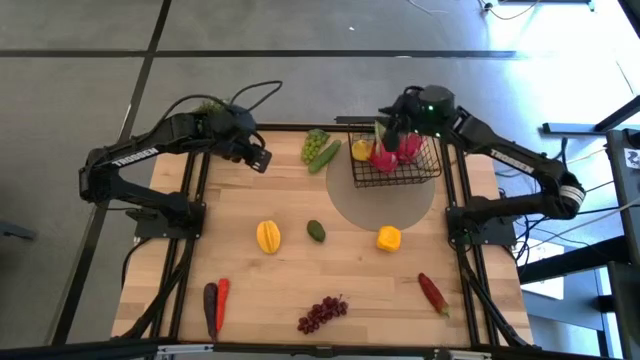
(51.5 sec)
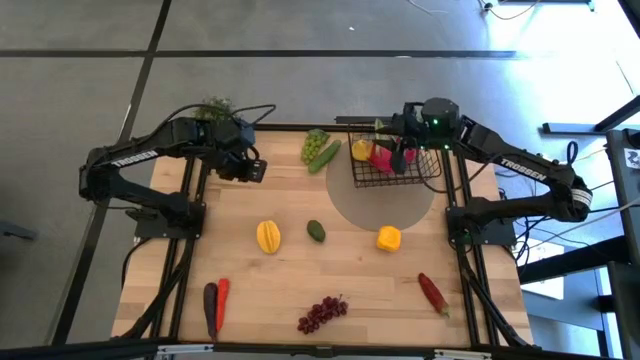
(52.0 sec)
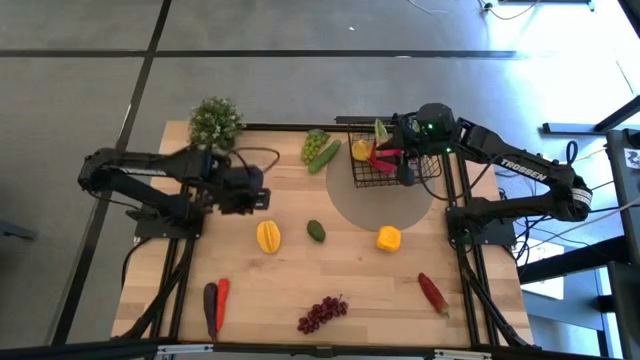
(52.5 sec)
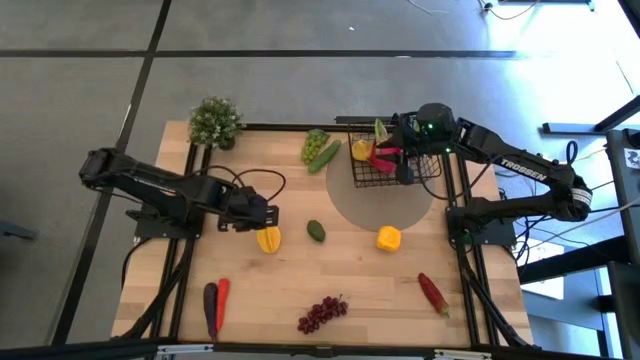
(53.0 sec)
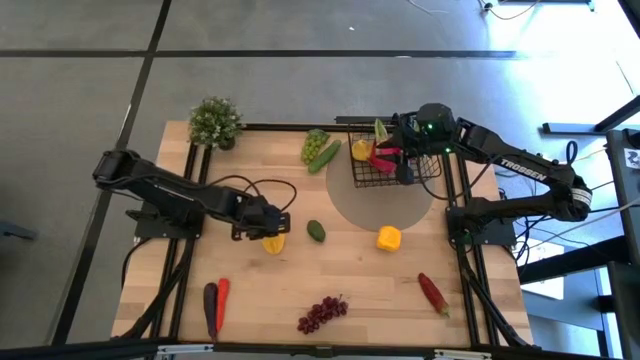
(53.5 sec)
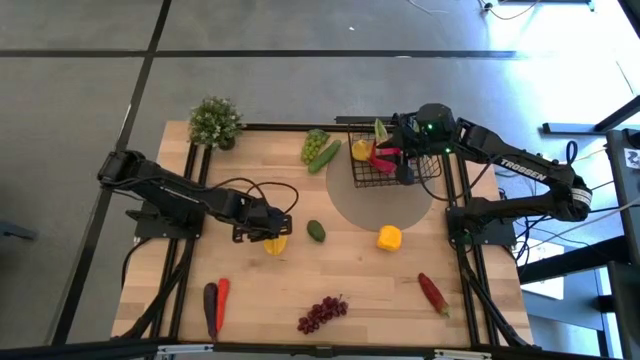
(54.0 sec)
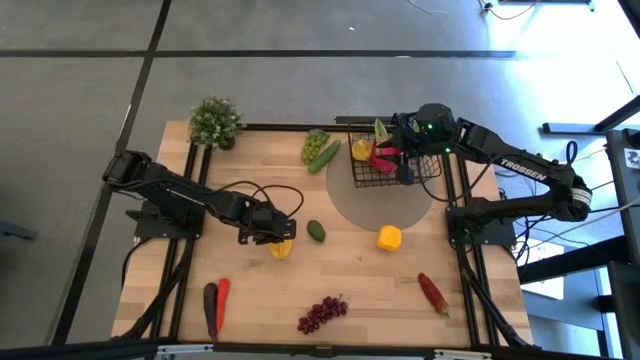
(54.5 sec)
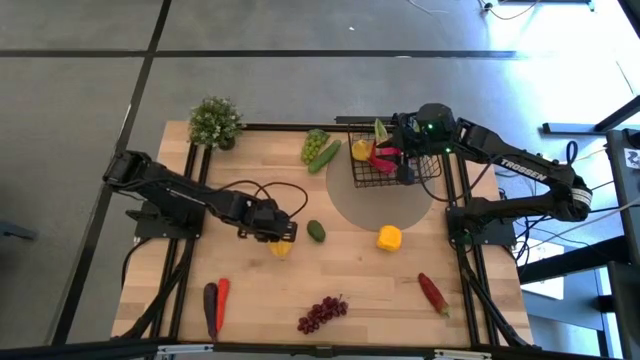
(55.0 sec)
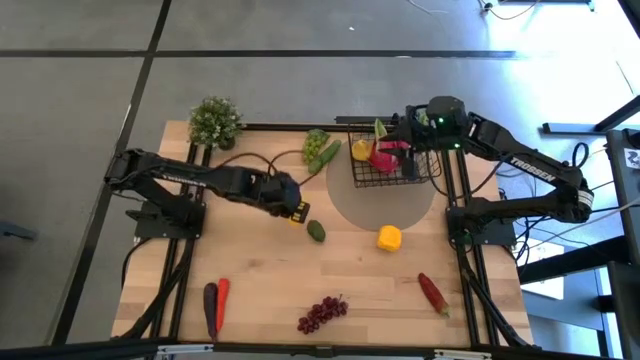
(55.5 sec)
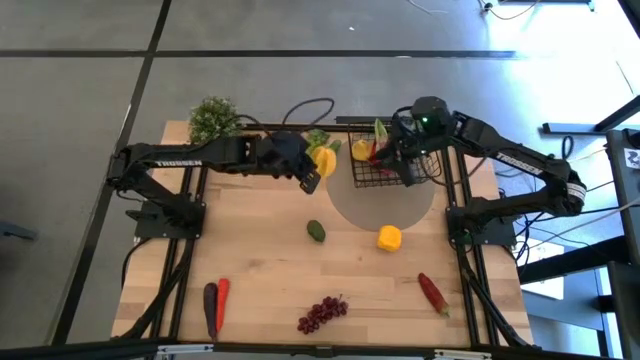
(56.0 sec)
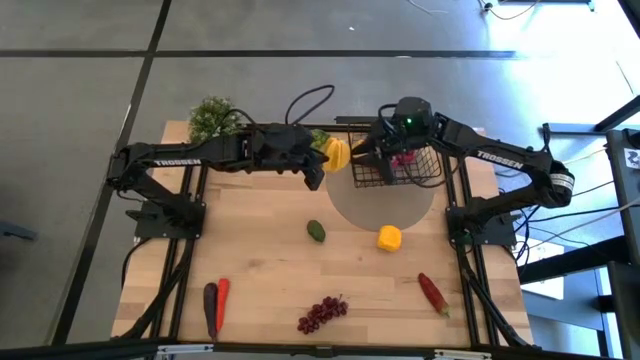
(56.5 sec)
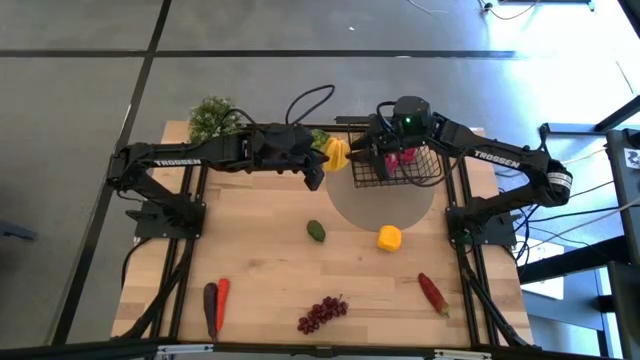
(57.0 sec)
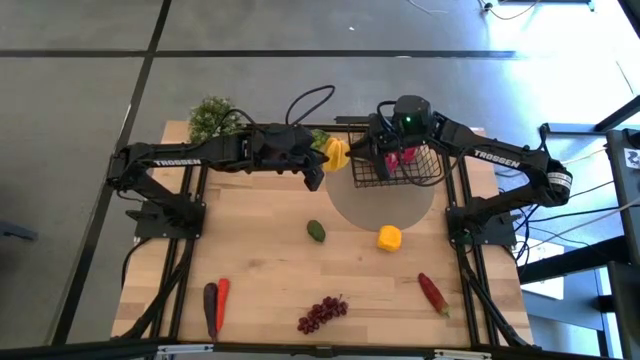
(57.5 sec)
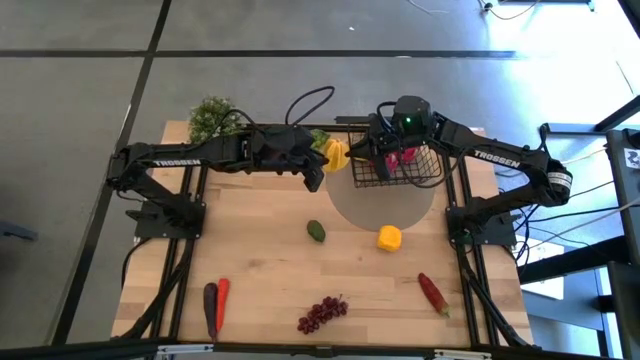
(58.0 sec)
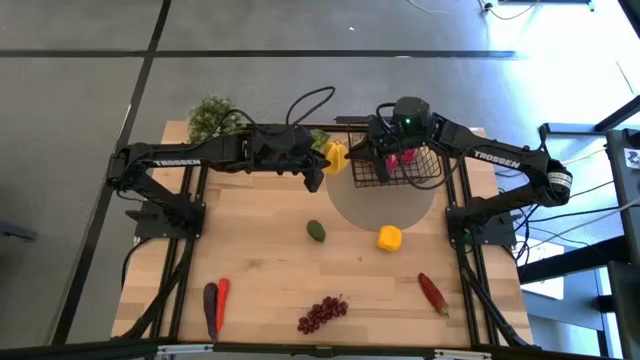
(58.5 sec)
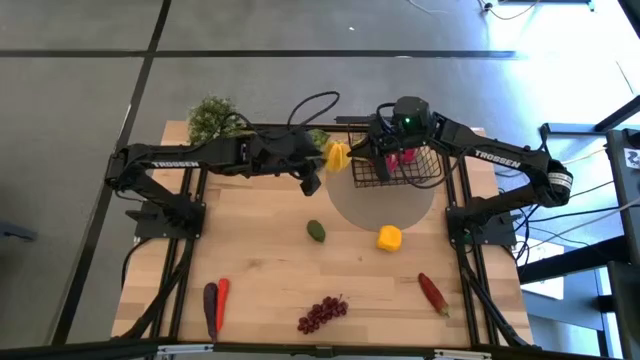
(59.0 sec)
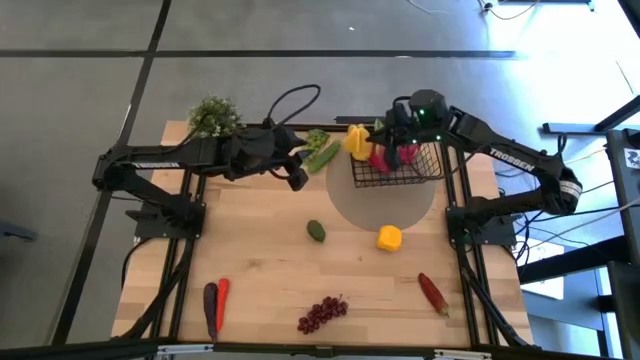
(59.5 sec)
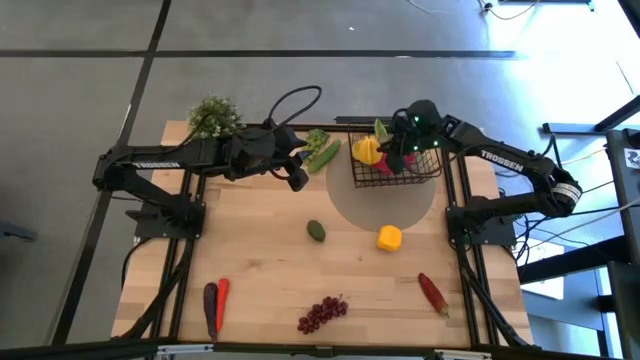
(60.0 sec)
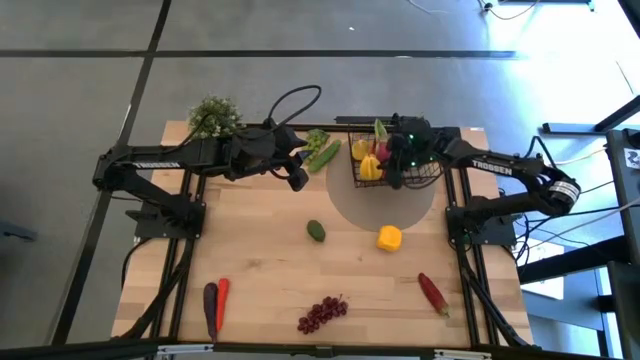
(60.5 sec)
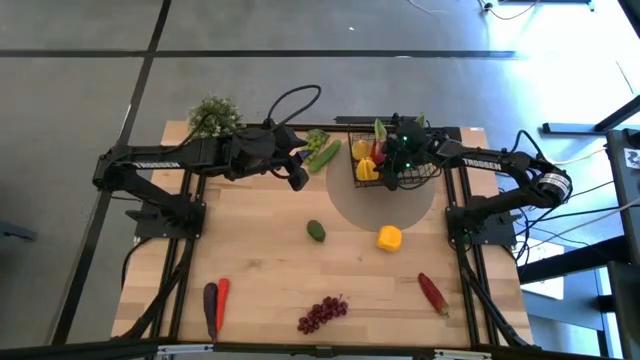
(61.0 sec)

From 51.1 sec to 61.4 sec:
Task: Build produce basket
Put the starfruit into the wire basket

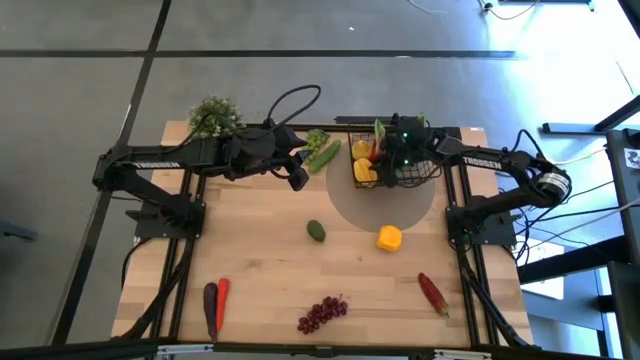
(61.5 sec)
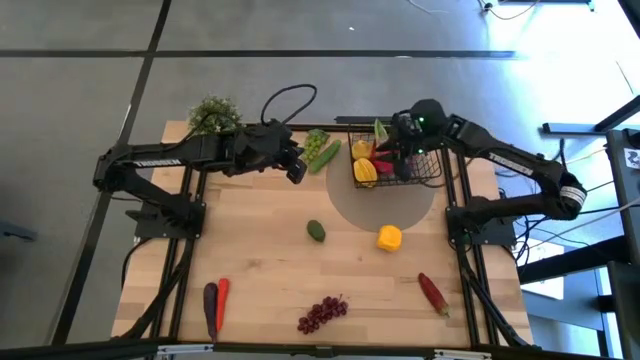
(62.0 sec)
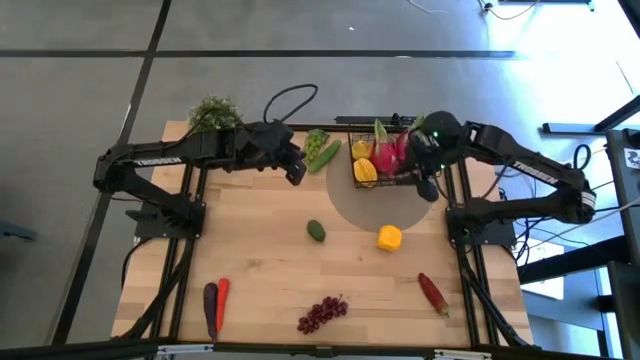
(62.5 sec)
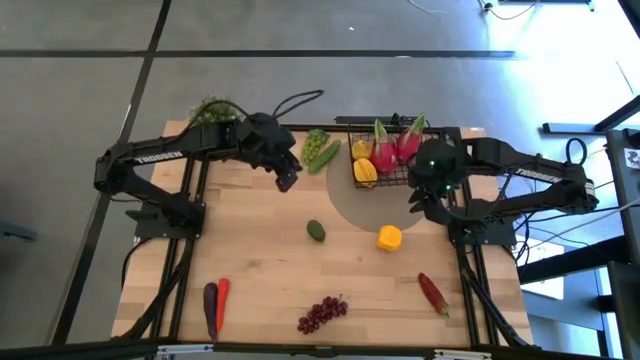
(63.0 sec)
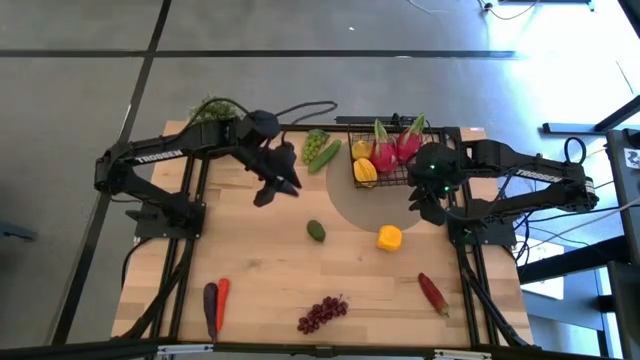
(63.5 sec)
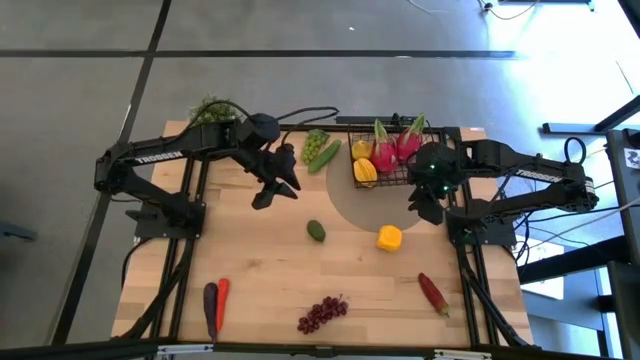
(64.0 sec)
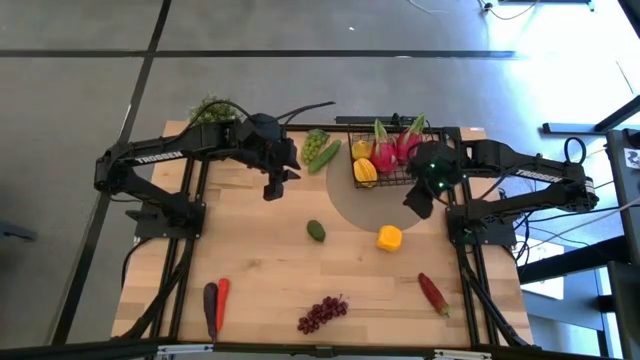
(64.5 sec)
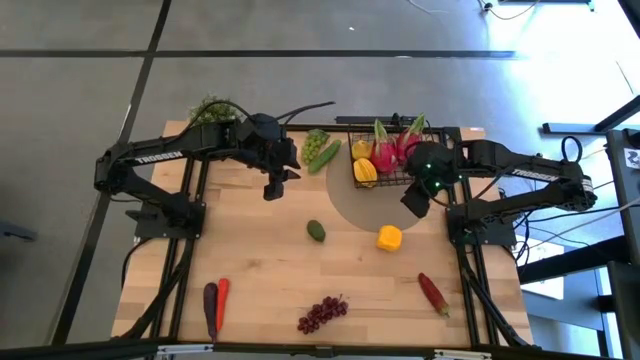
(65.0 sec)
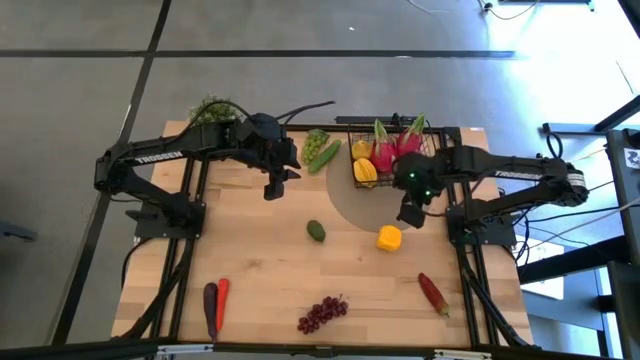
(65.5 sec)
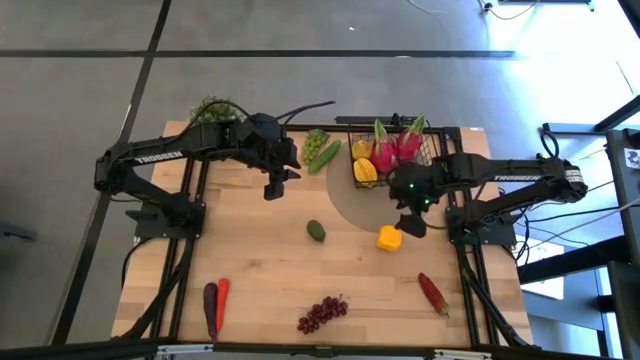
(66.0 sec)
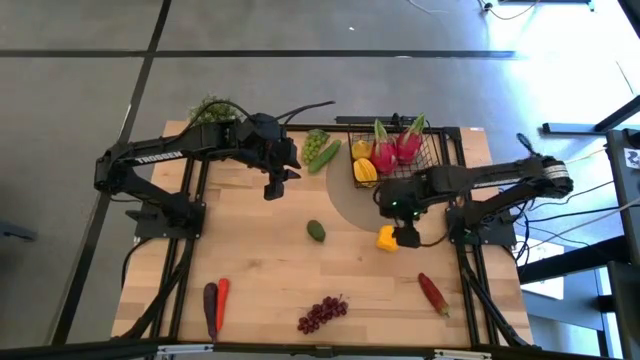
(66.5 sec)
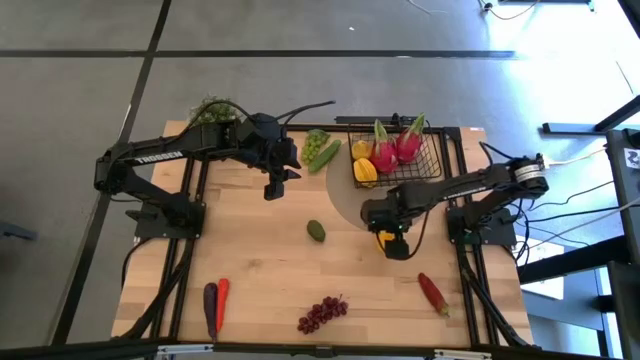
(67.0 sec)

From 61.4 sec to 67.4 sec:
Put the yellow bell pepper into the wire basket

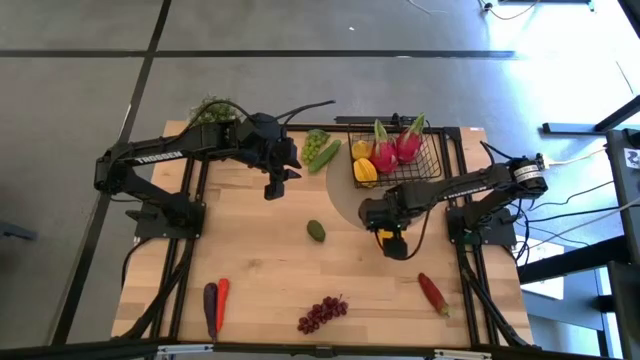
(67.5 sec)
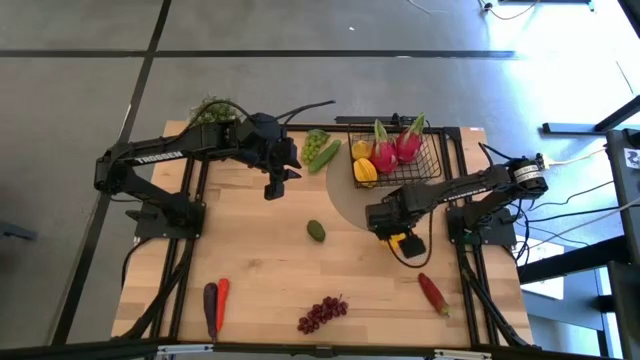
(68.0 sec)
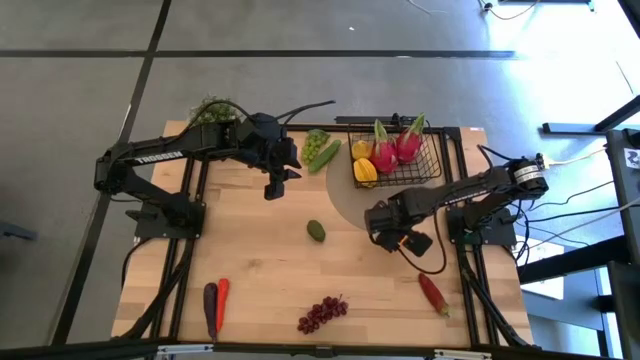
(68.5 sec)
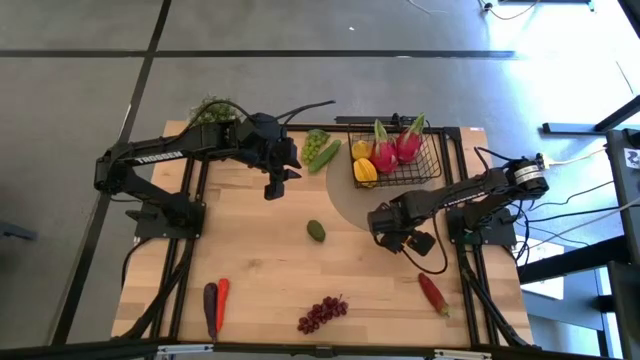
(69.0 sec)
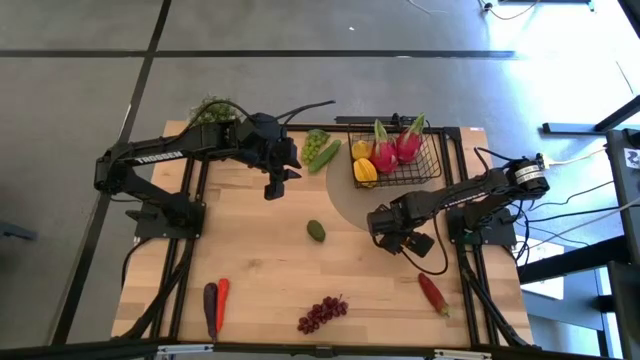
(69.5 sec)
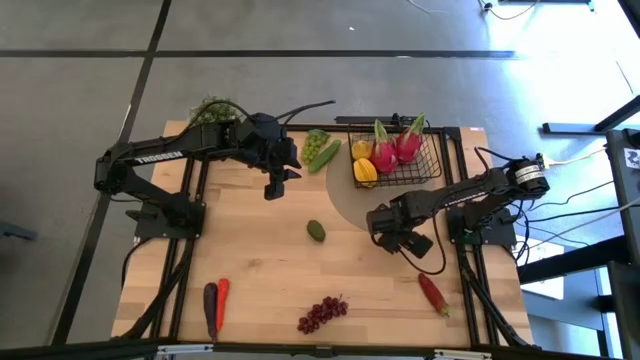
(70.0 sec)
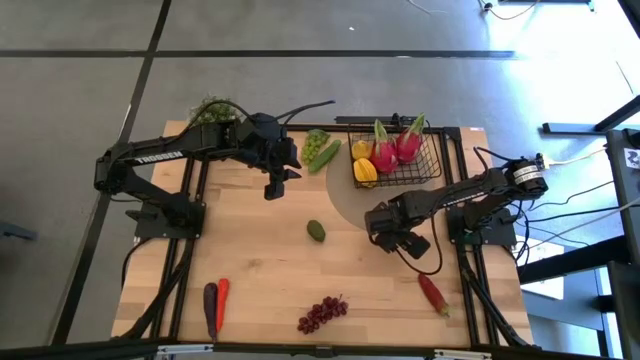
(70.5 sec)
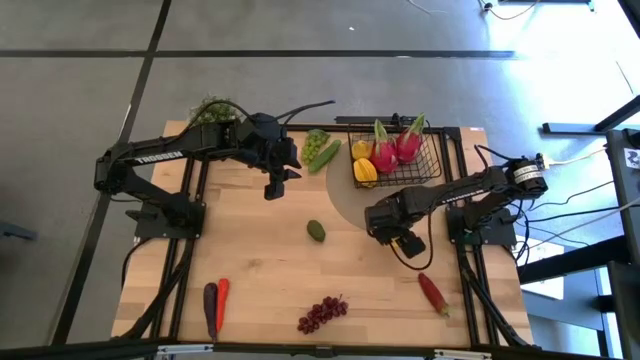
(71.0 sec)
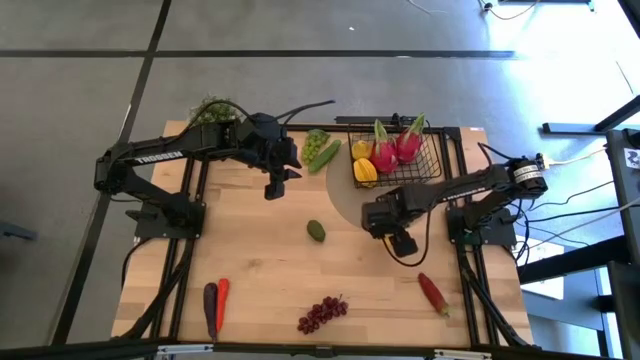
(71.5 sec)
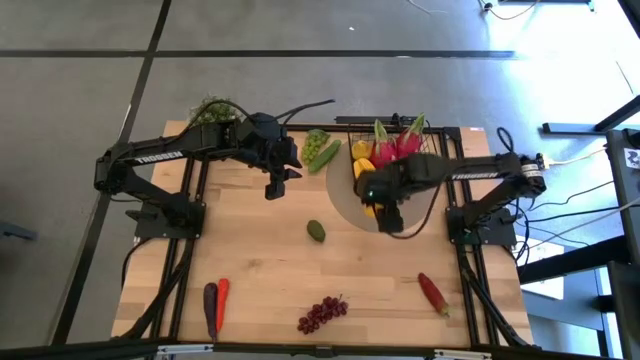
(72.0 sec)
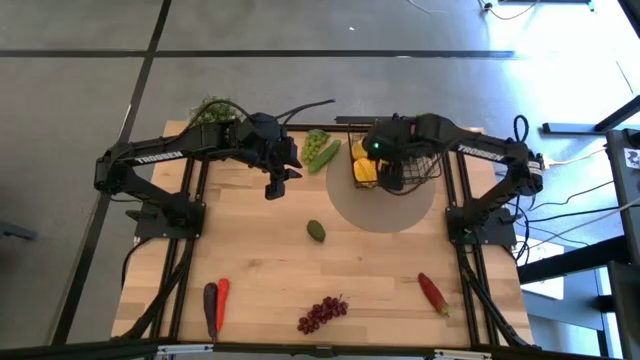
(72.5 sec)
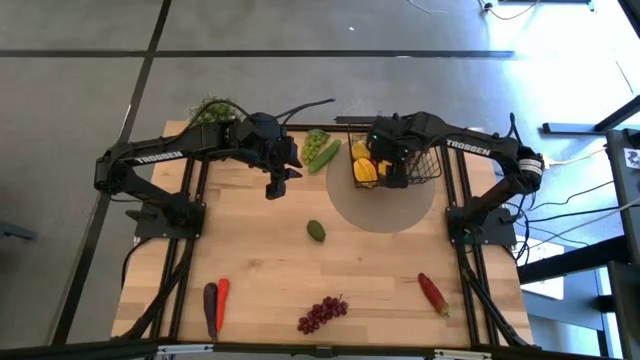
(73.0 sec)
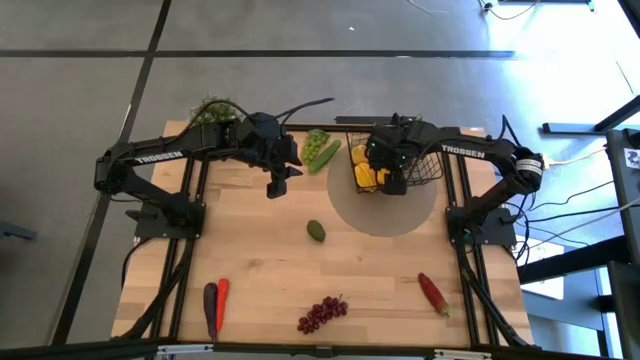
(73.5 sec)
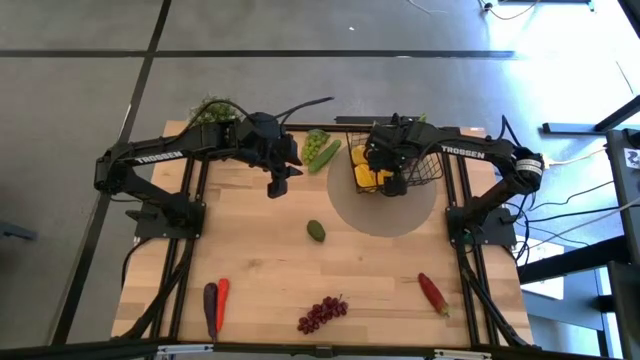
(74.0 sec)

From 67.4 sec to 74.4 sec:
Put the yellow bell pepper into the wire basket
